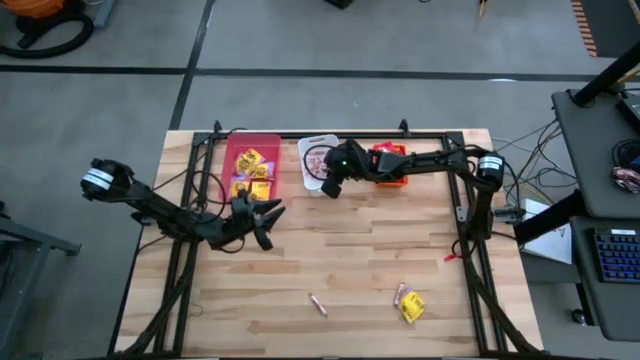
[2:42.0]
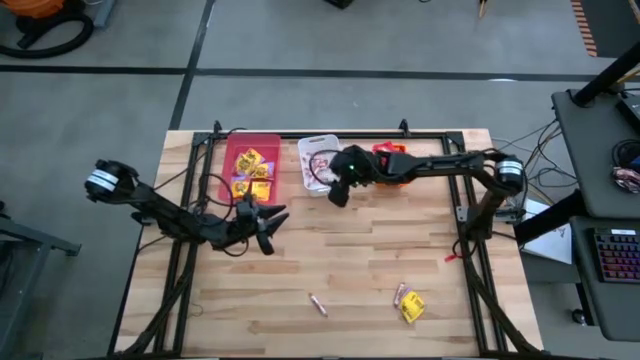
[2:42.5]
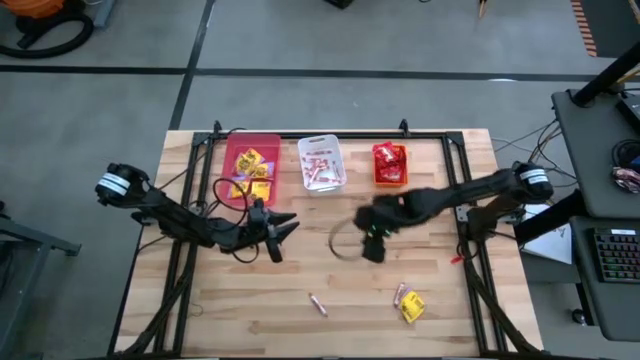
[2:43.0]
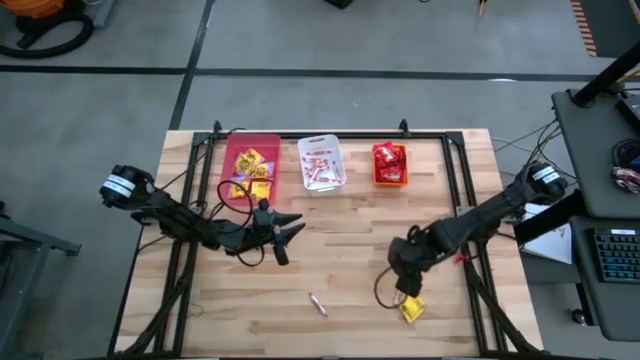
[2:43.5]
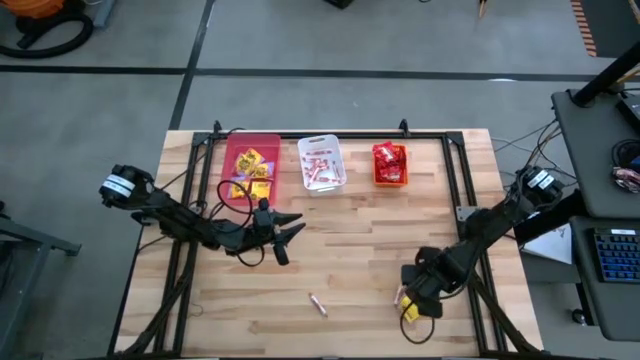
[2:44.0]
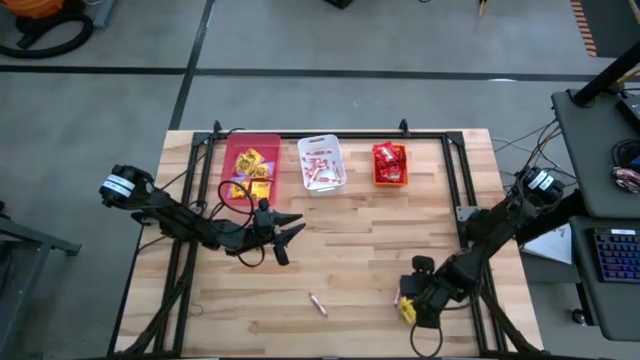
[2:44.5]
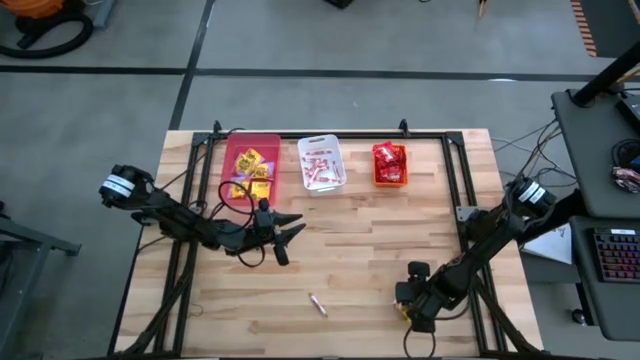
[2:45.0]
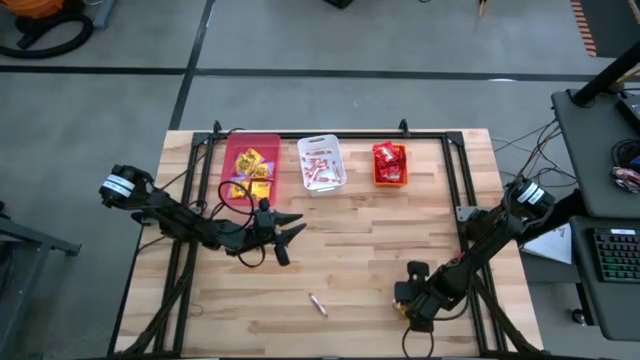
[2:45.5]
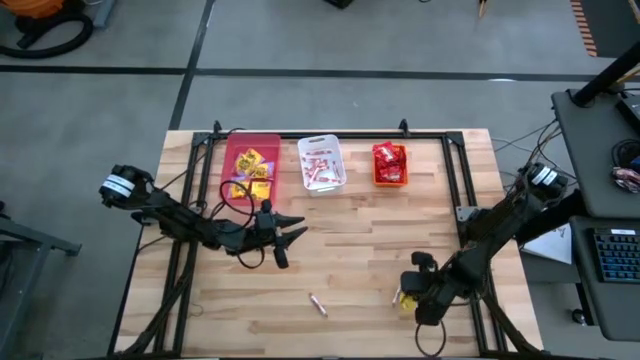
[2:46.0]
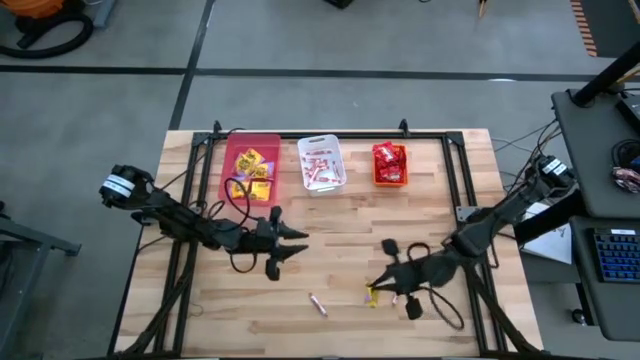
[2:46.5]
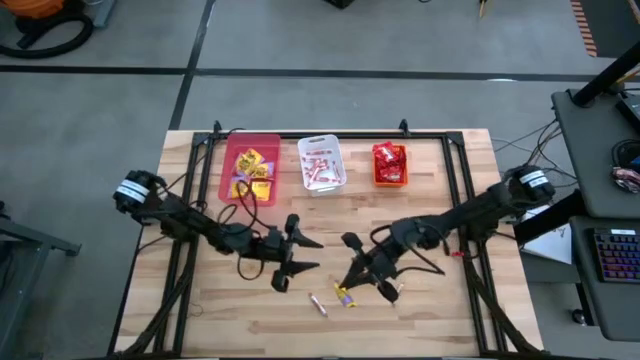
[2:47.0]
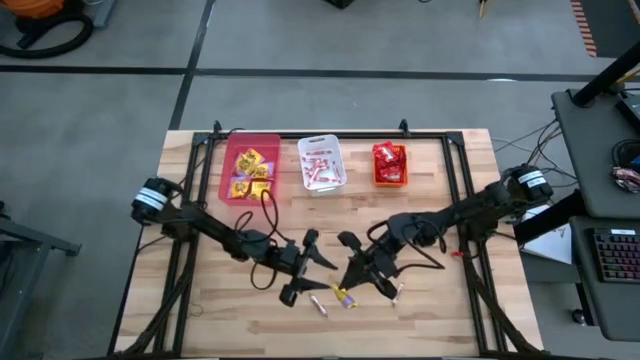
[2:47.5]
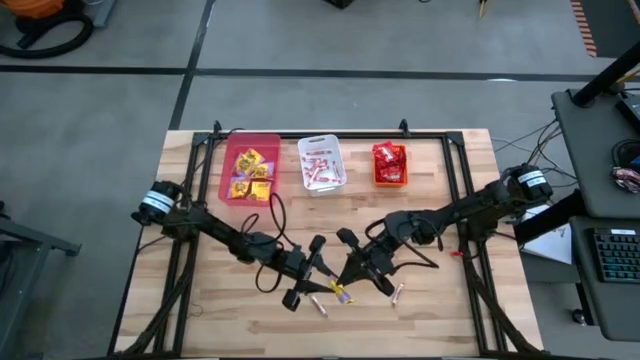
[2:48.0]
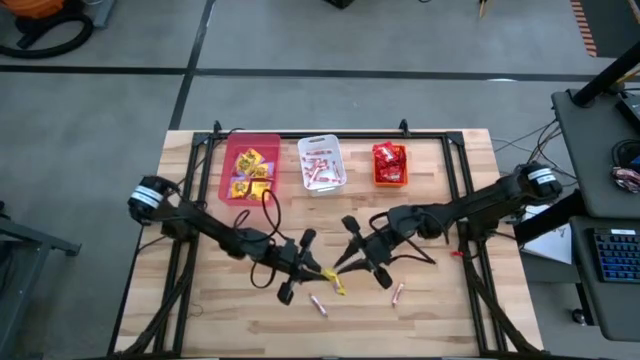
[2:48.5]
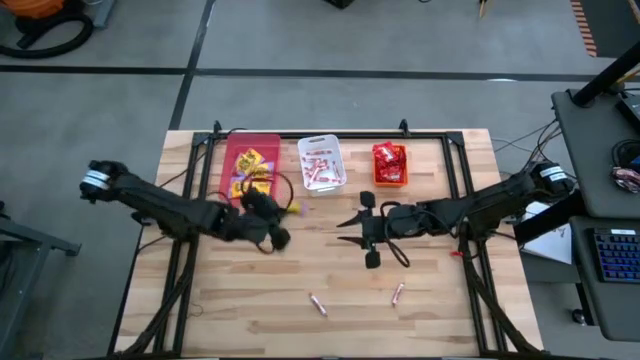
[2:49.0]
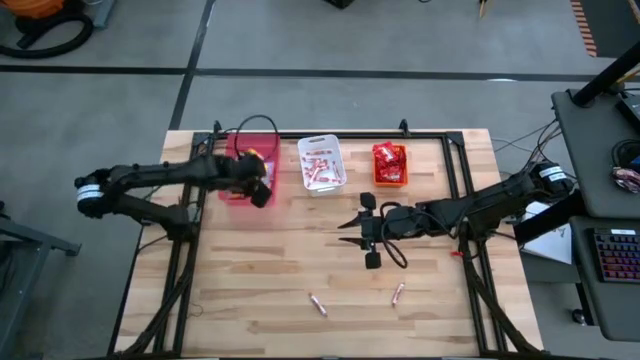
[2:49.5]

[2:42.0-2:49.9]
Task: Sort candy
Put the yellow candy into the pink bin

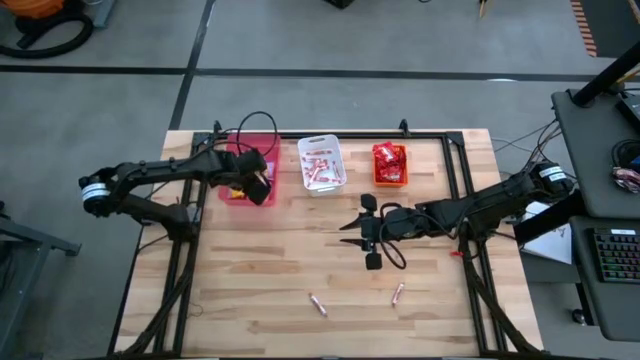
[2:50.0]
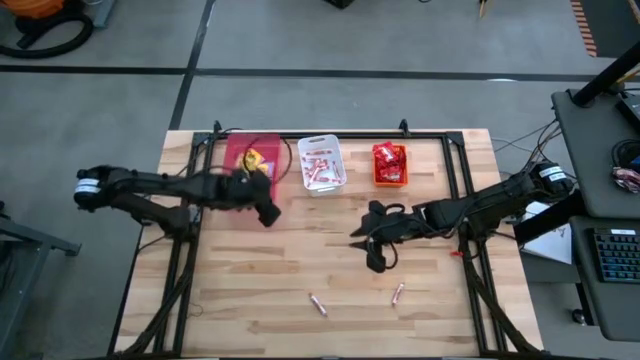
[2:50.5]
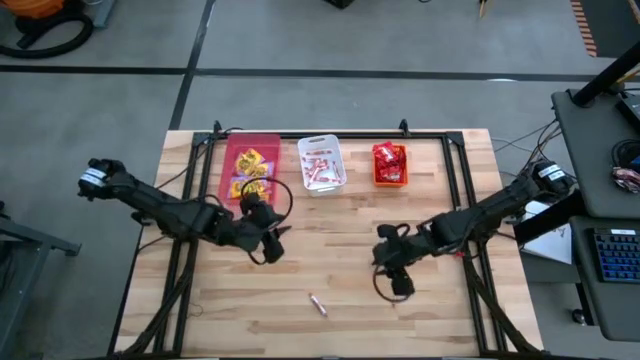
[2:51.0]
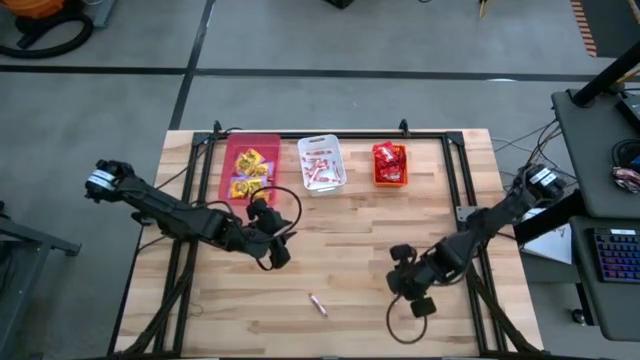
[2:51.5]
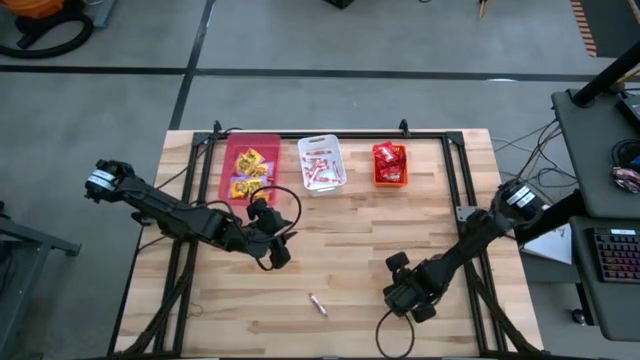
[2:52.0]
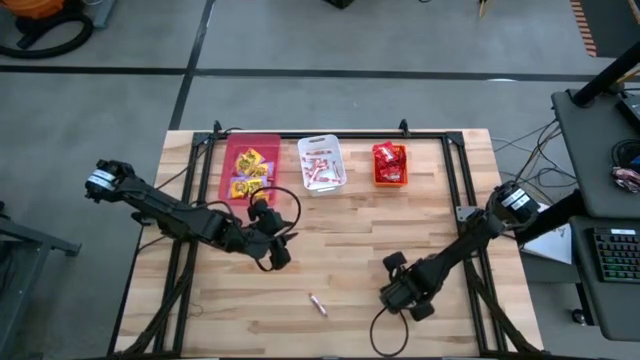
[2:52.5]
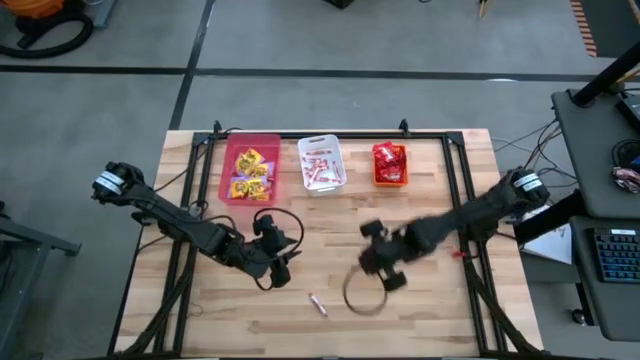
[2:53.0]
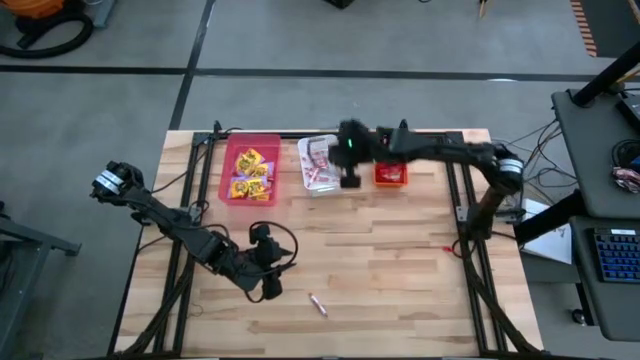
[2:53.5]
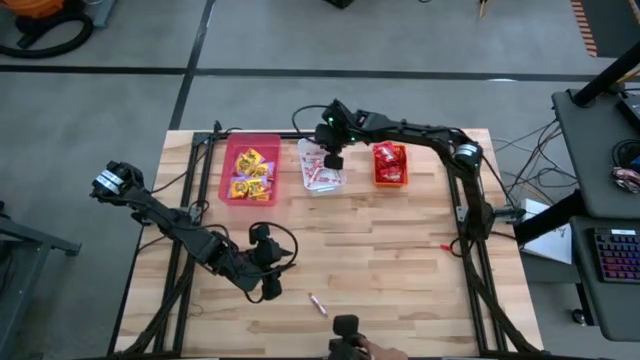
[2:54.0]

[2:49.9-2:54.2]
Put the white candy into the white bin

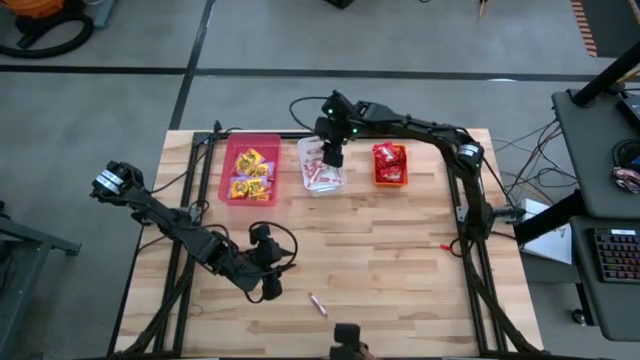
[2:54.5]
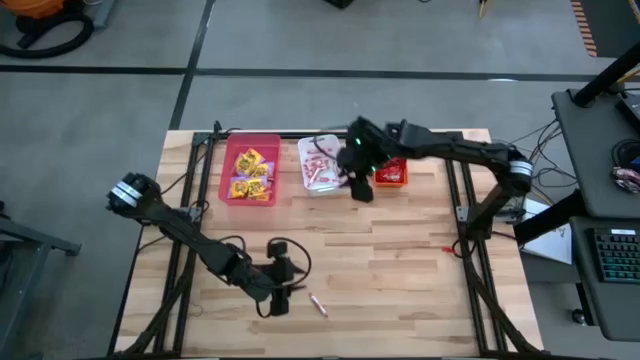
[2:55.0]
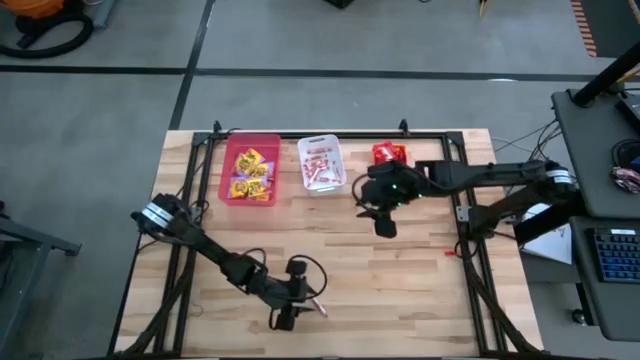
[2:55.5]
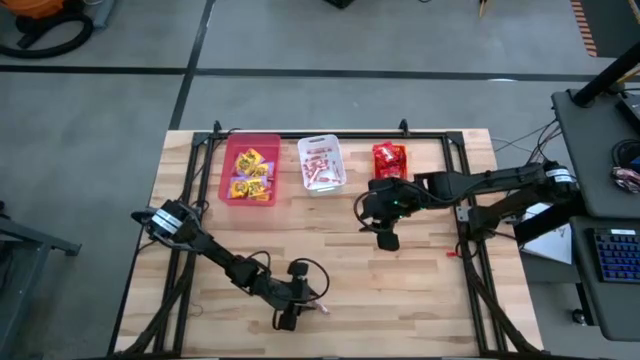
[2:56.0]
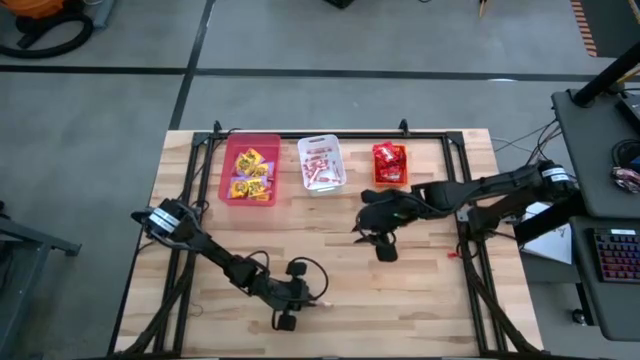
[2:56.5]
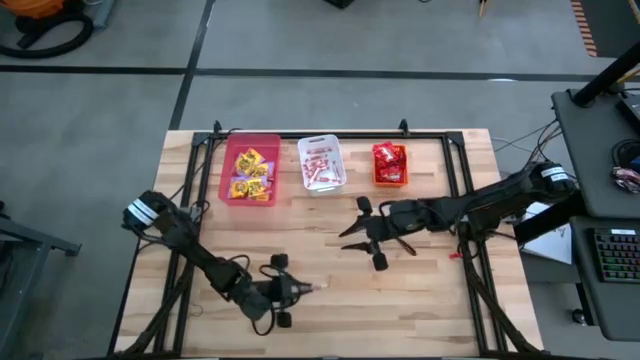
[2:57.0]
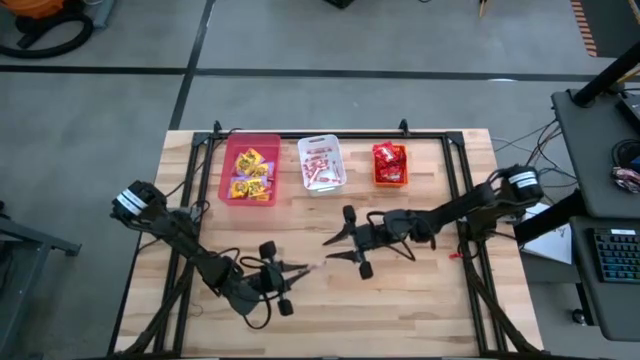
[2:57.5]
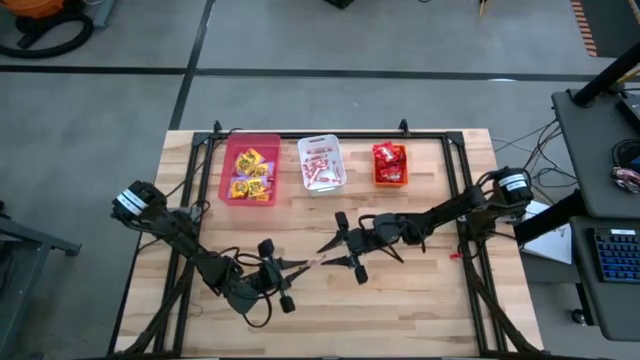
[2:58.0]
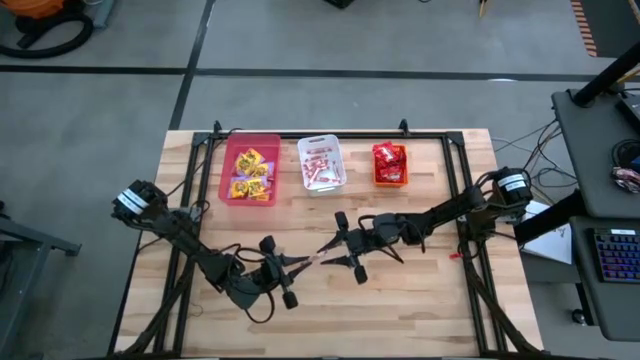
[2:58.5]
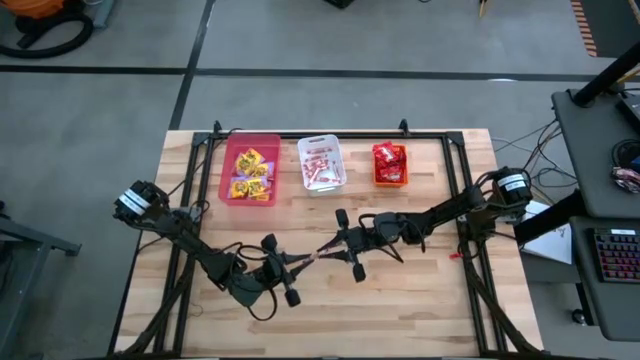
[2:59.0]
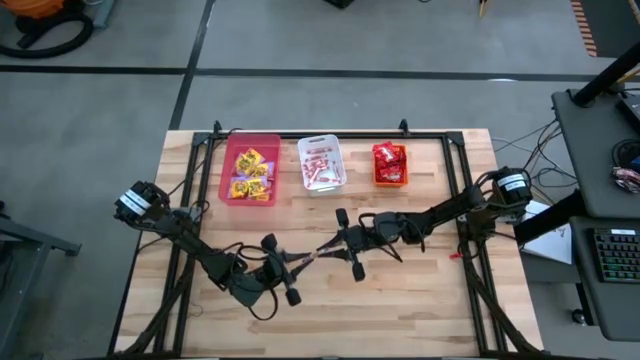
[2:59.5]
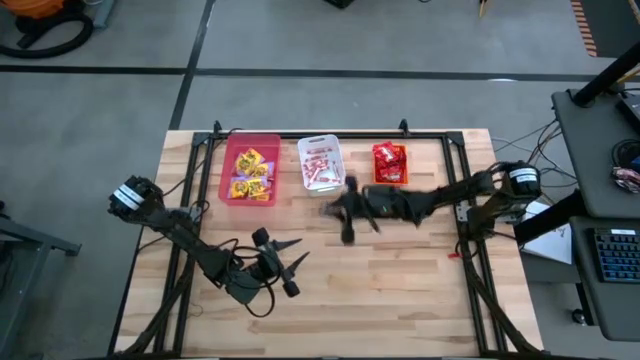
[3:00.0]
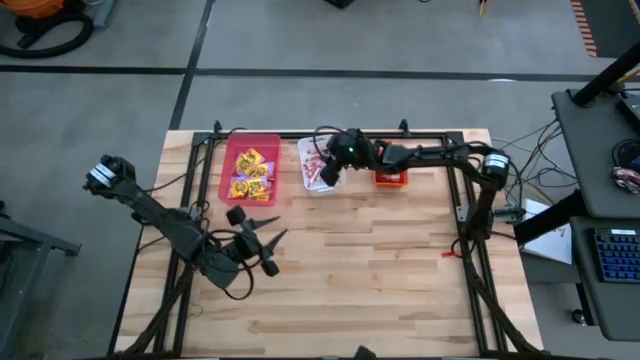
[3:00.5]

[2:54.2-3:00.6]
Put the white candy into the white bin

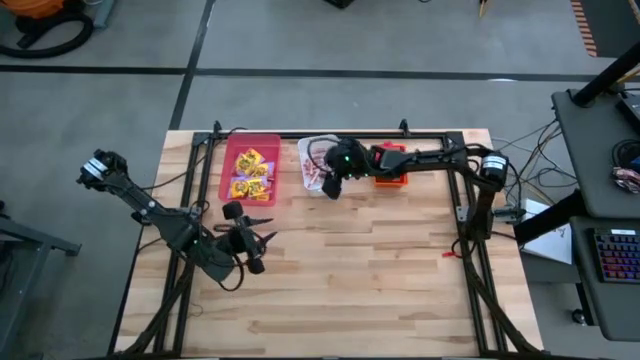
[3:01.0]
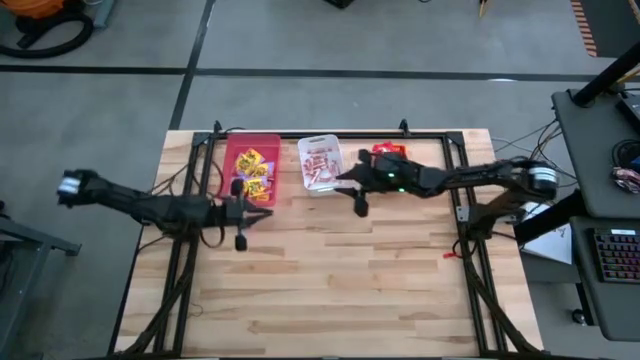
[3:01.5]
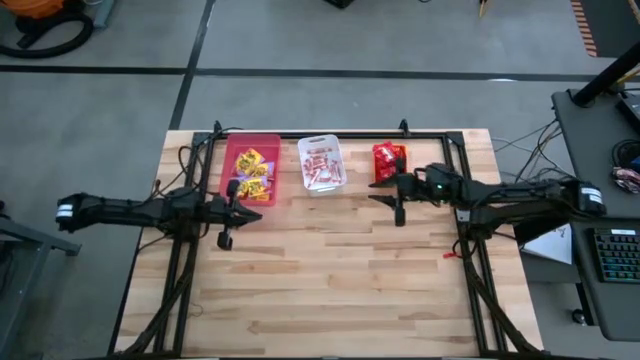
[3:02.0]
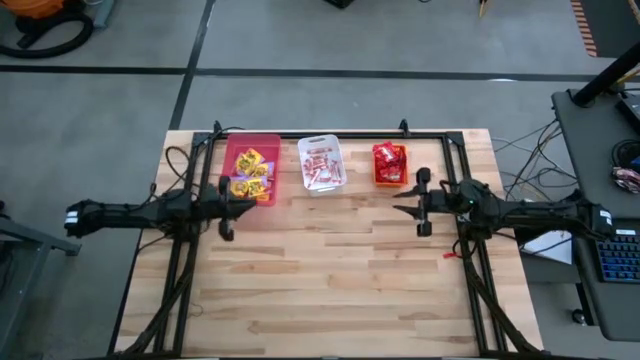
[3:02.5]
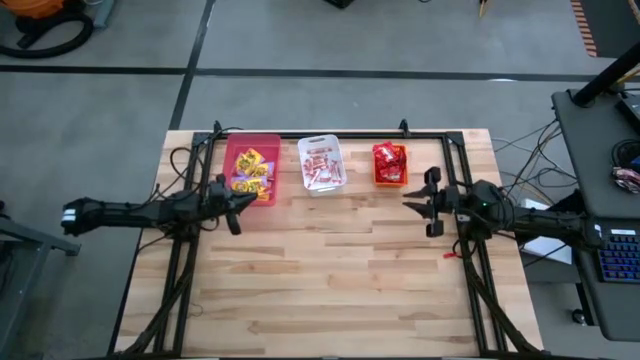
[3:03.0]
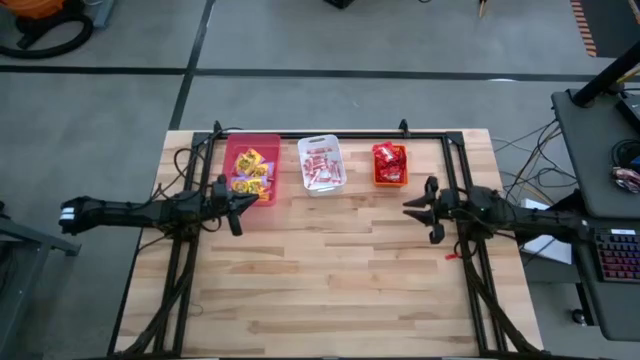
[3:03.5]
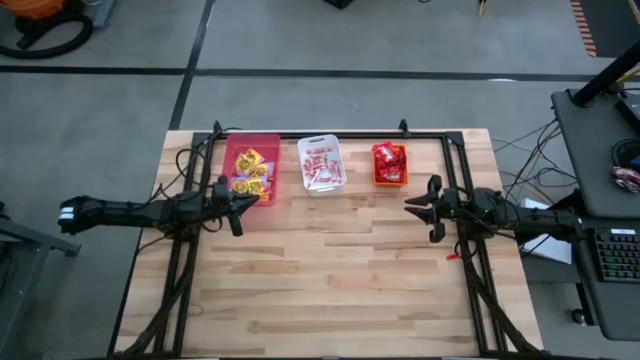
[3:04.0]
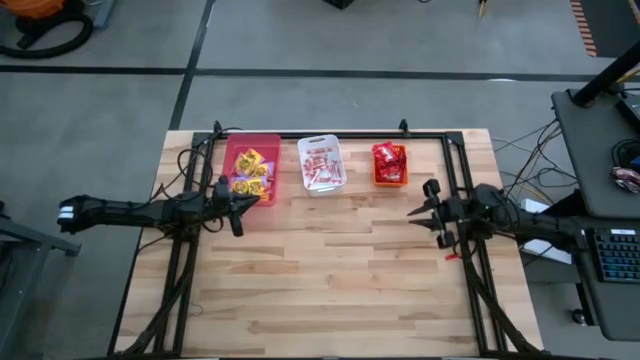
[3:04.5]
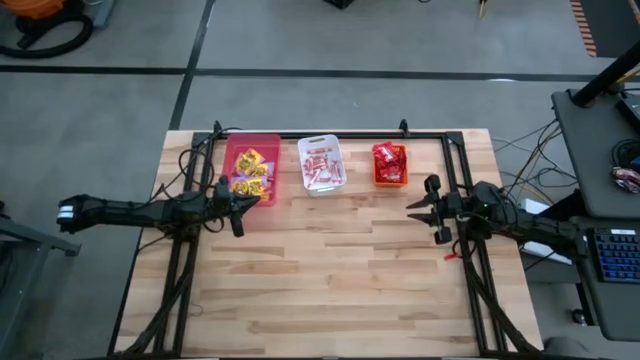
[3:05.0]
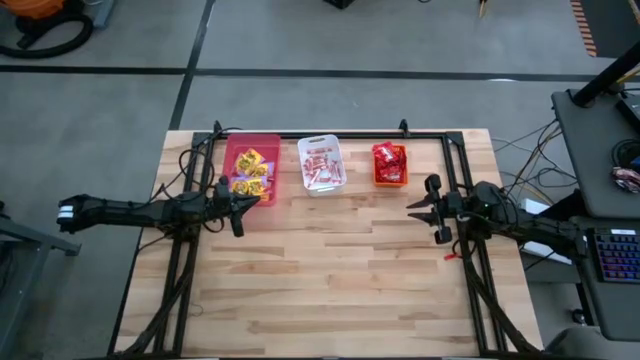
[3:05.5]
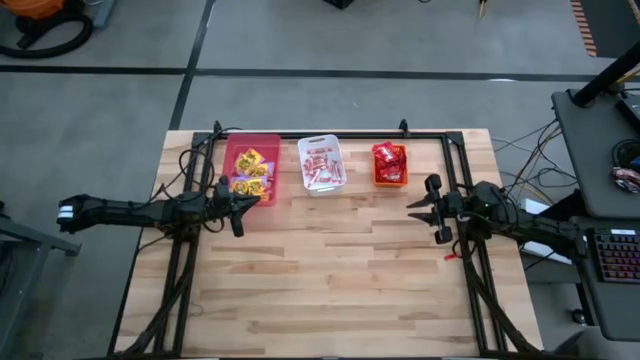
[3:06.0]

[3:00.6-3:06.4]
Return to Home Position
